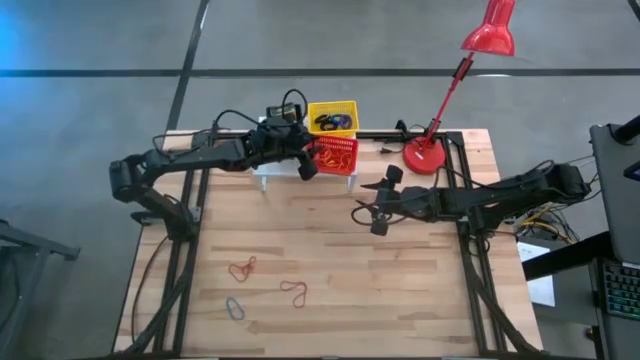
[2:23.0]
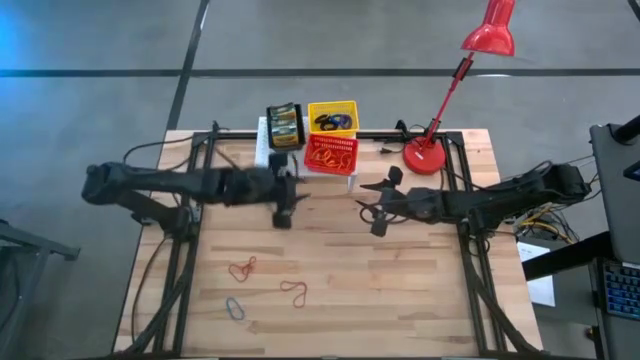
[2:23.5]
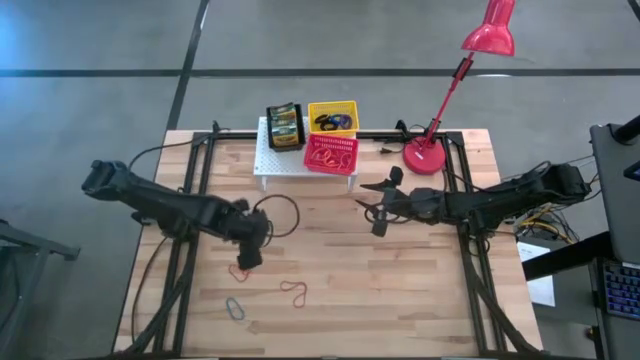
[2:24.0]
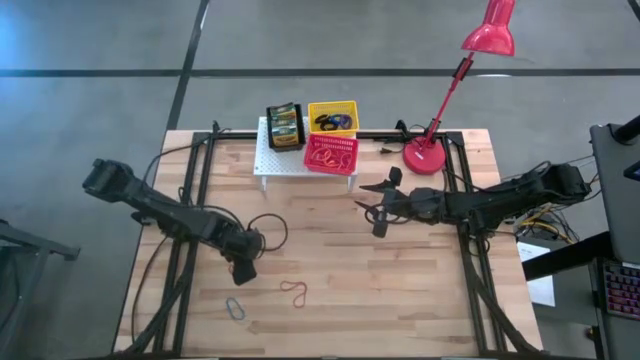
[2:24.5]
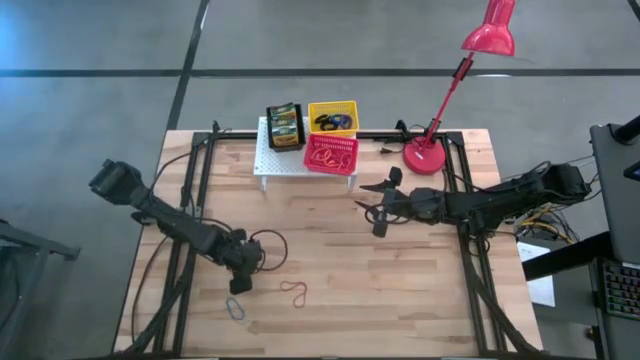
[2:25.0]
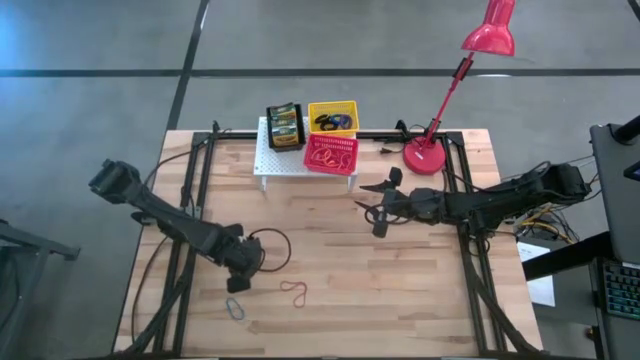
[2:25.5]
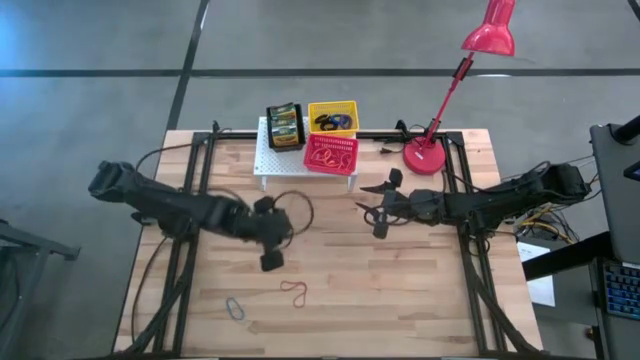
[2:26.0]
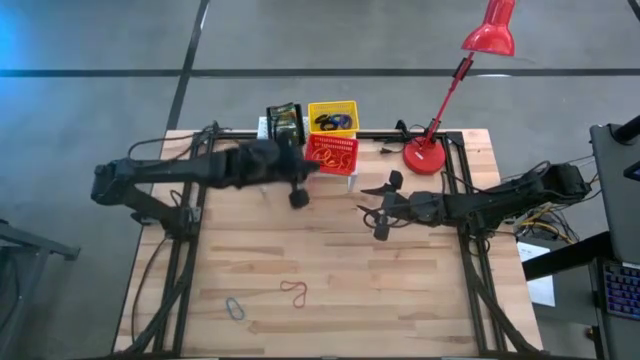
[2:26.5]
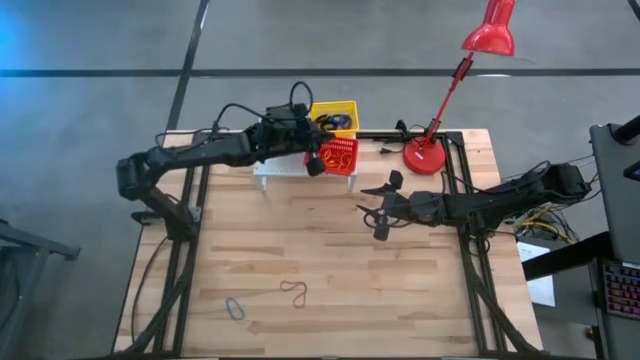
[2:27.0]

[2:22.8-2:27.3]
Task: Pick & Place Office Desk Supplies
Put the red rubber band into the red bin on the shelf

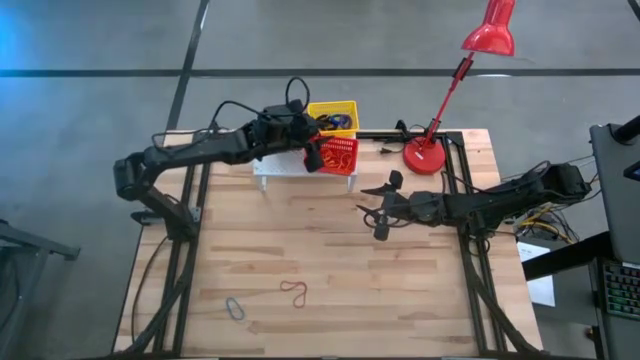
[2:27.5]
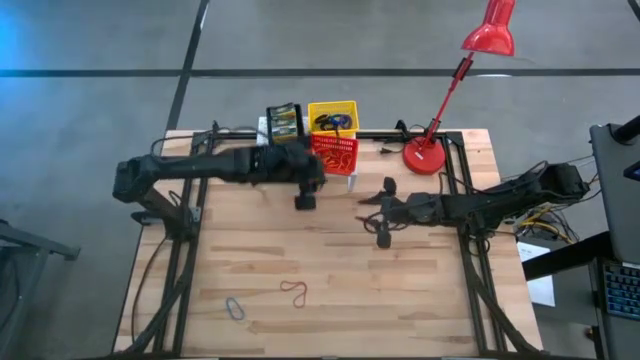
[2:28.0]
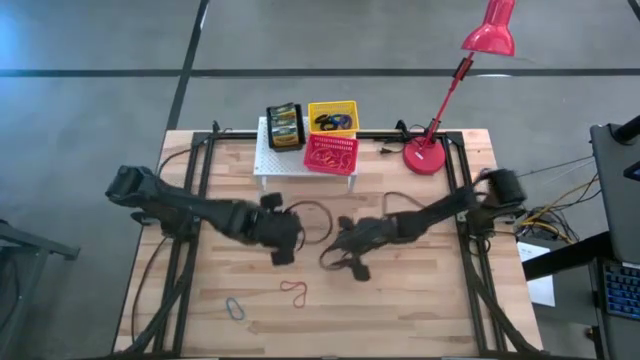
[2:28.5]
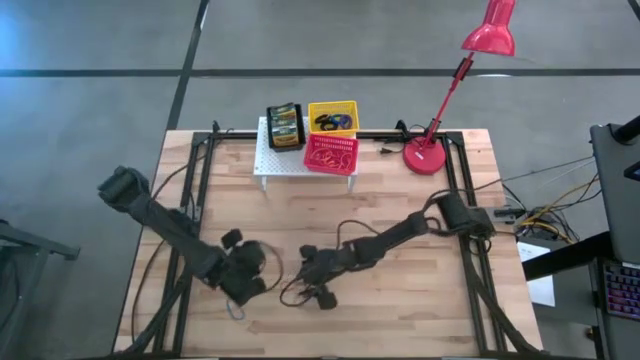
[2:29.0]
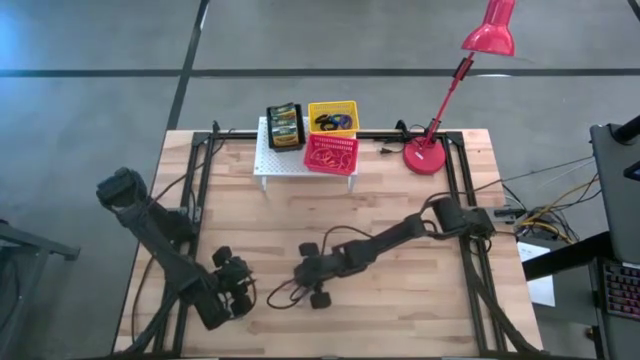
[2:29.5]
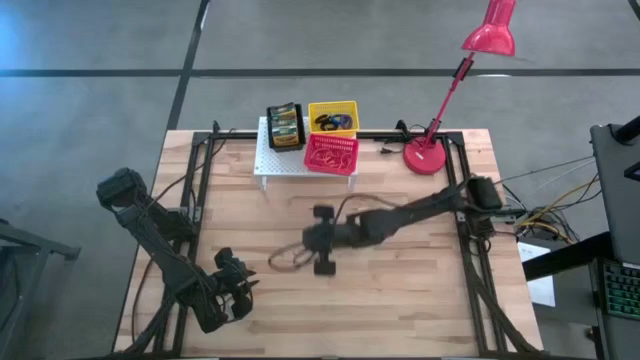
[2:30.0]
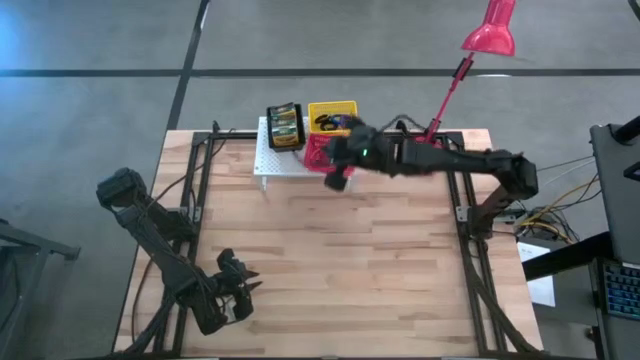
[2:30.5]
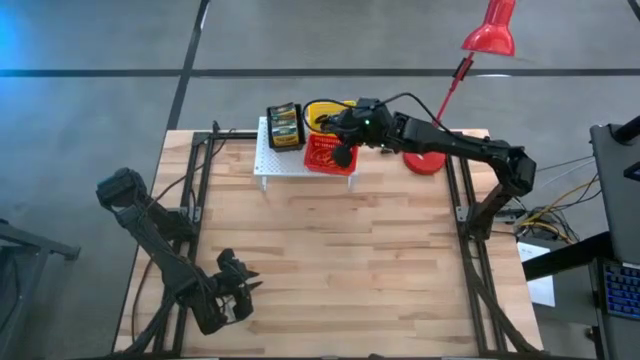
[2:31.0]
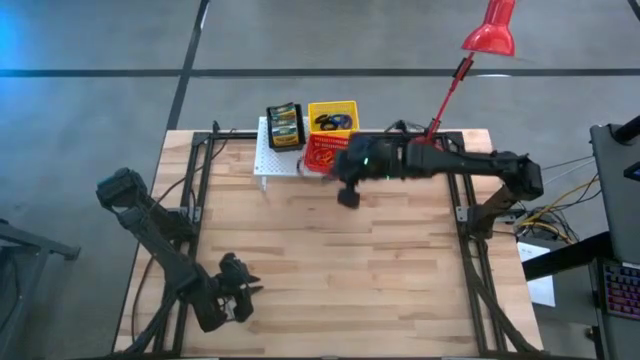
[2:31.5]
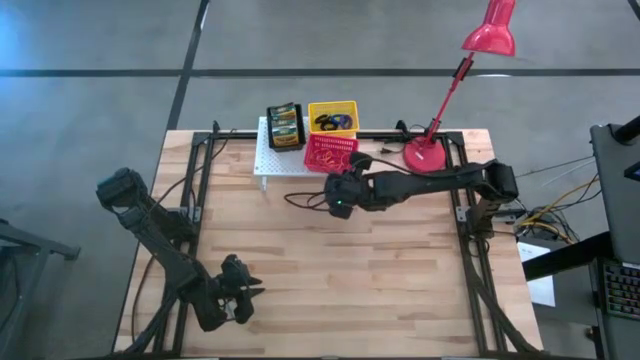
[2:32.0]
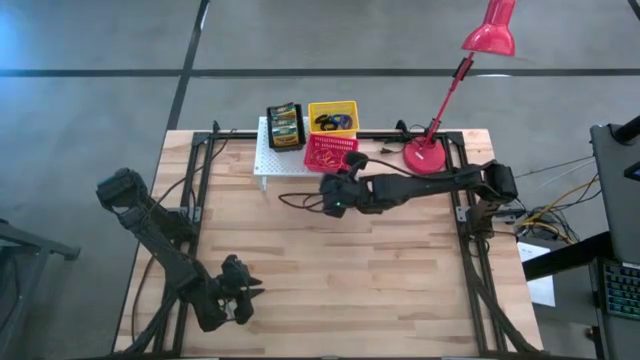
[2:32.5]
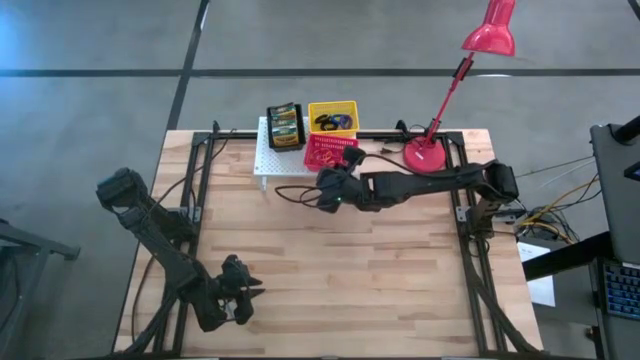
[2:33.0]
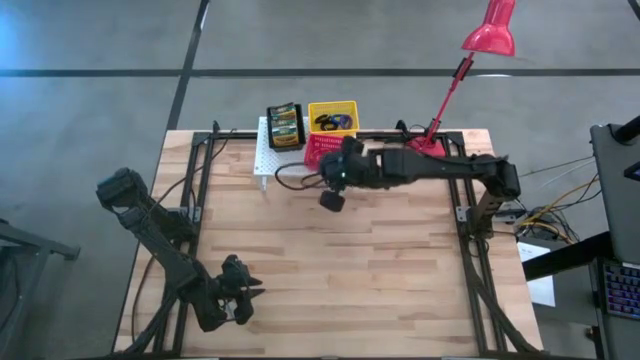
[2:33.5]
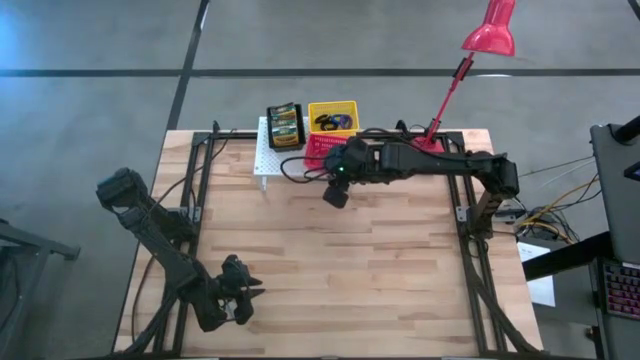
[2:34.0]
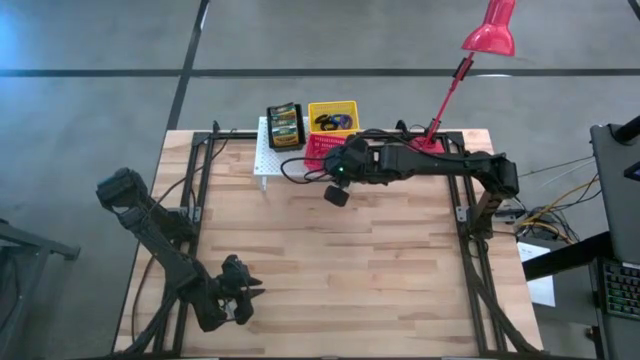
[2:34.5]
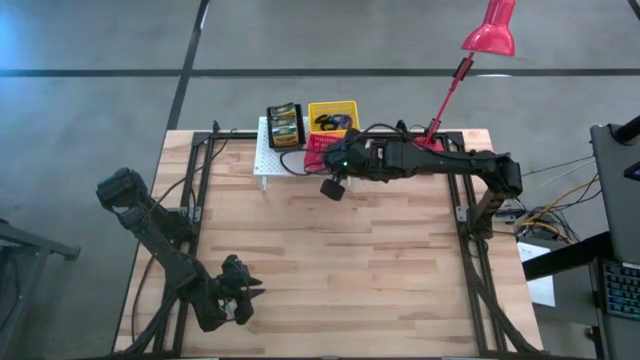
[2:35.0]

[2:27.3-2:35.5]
Put the red rubber band into the red bin on the shelf

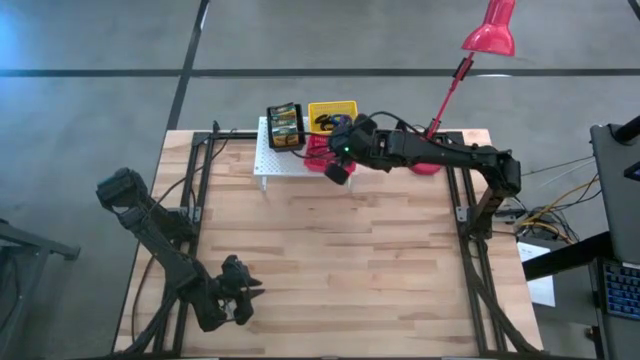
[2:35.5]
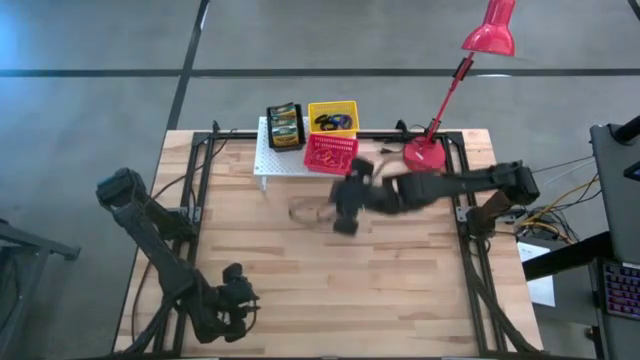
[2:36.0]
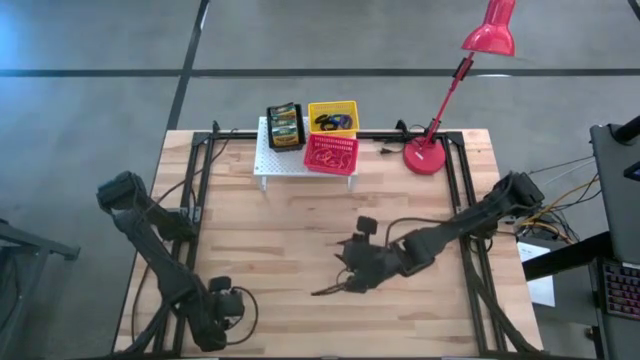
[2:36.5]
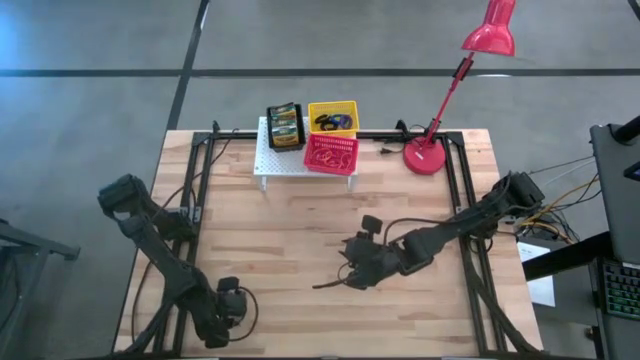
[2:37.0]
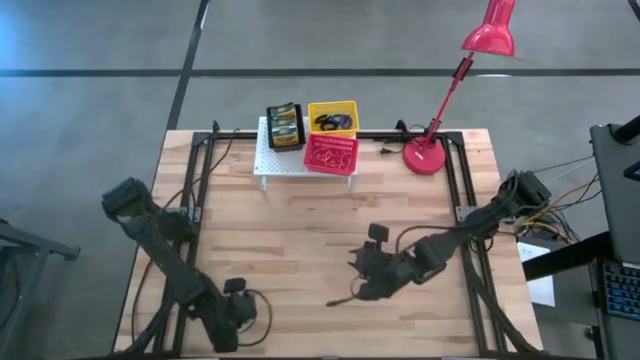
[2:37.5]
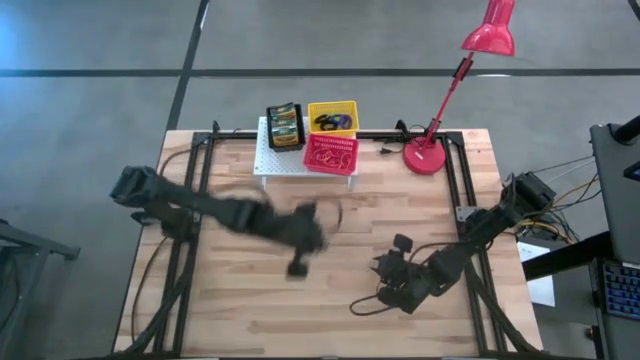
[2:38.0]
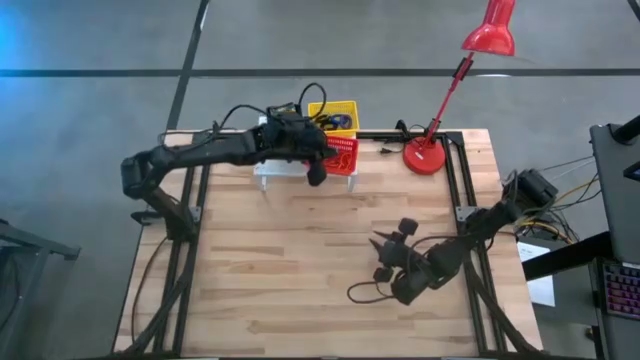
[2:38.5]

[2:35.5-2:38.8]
Put the blue rubber band into the red bin on the shelf

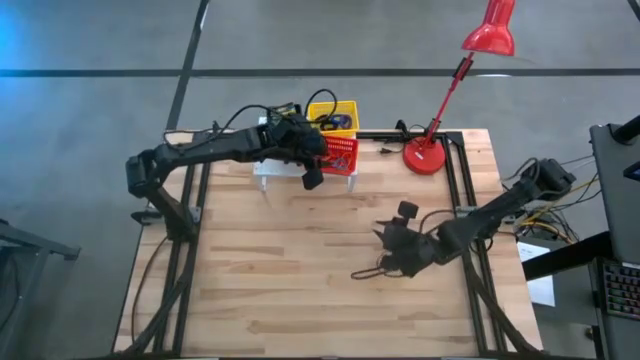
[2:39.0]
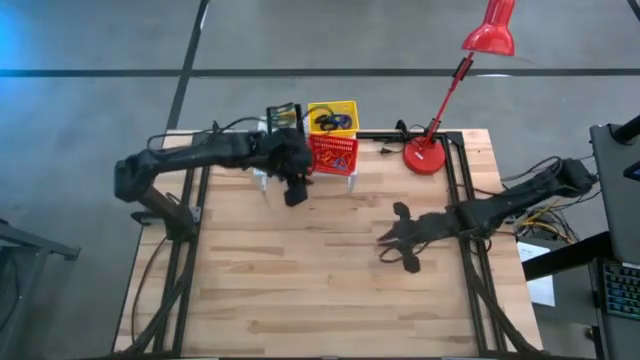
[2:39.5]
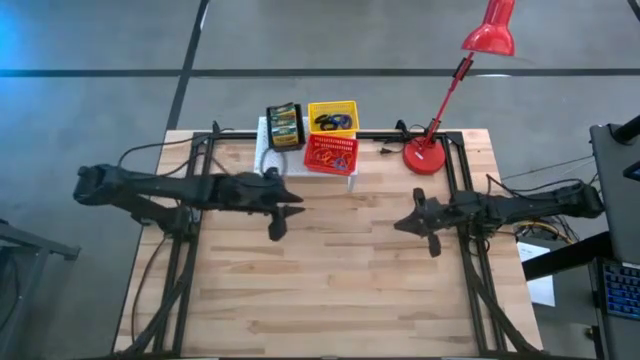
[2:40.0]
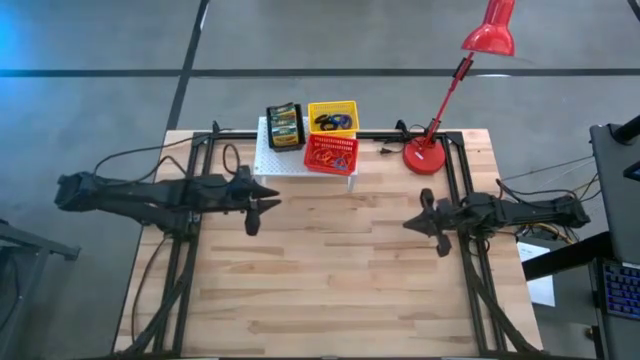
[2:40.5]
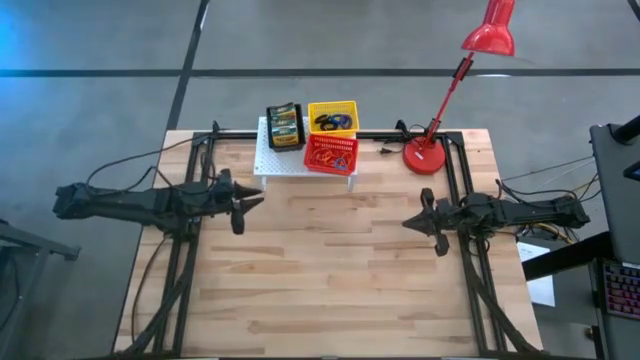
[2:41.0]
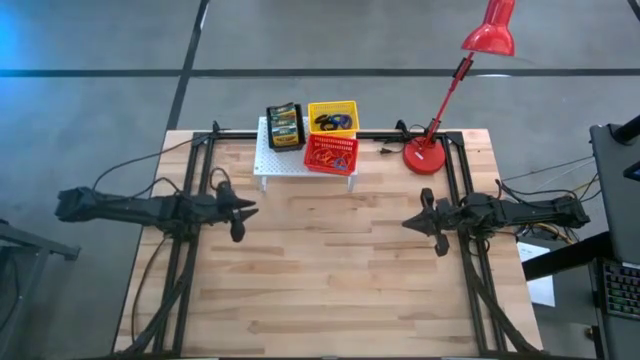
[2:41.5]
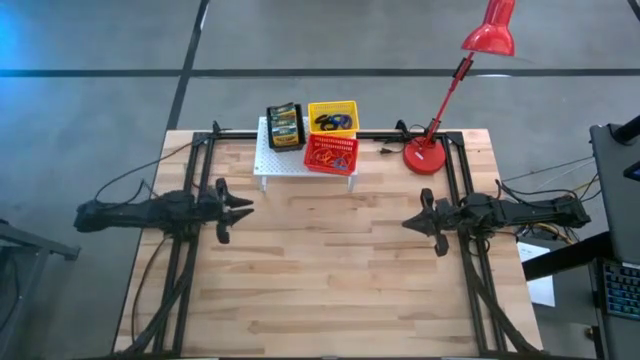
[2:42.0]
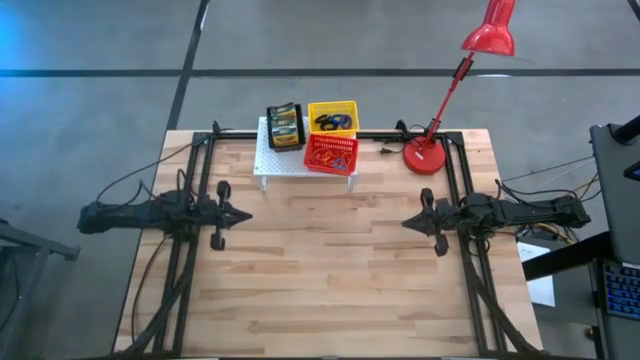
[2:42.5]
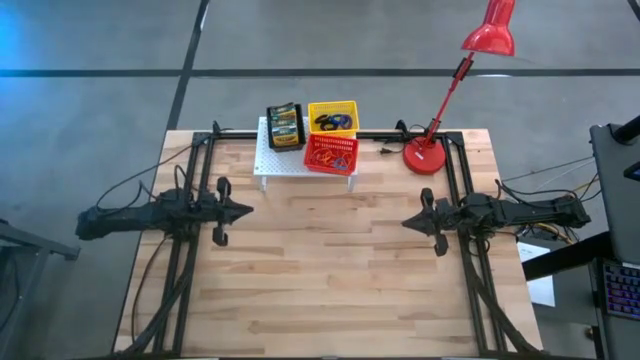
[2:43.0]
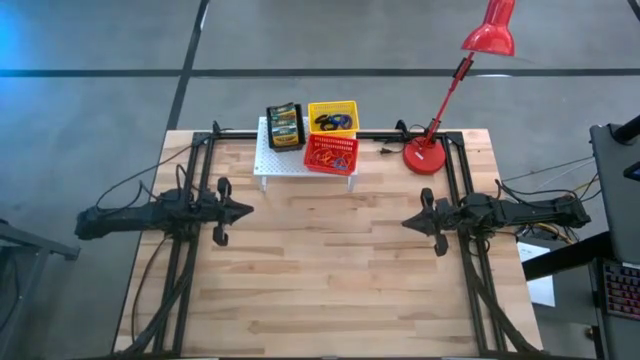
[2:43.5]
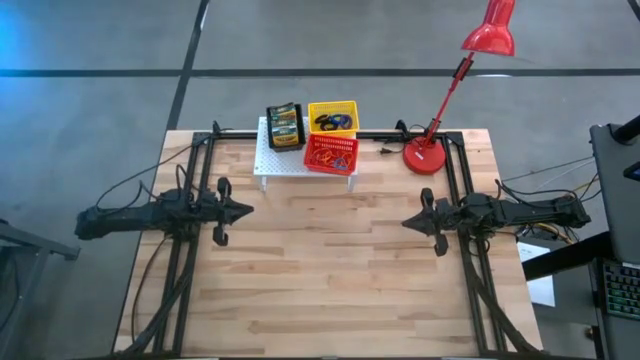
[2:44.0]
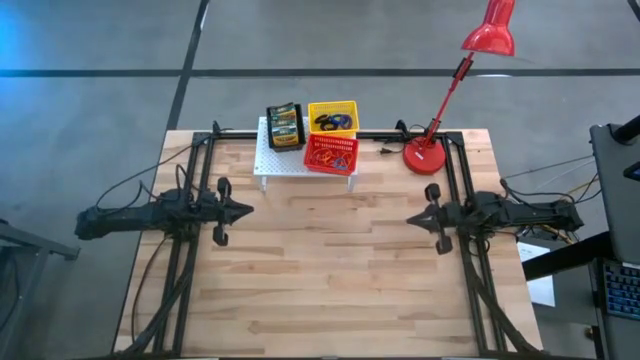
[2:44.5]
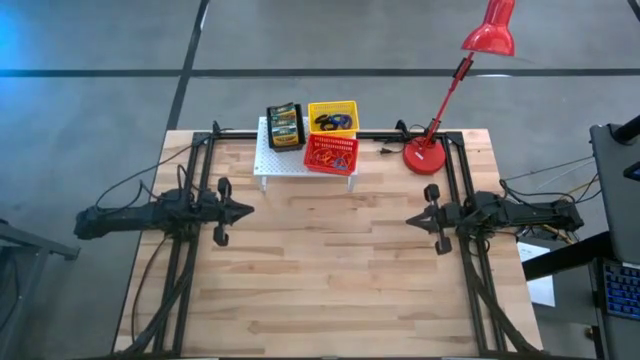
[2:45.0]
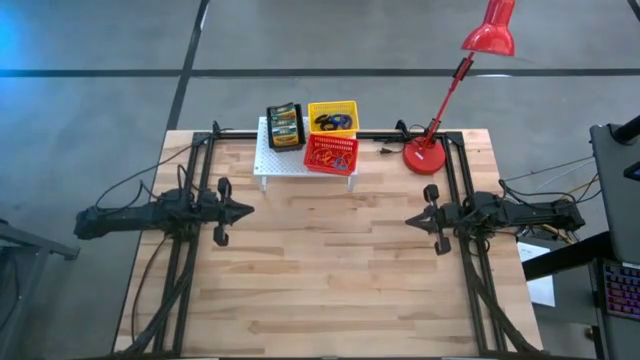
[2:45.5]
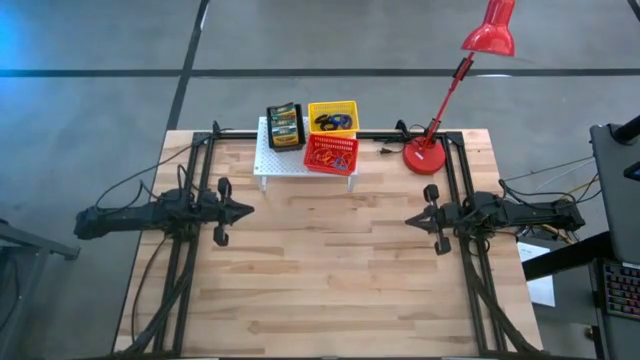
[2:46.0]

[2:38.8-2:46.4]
Return to Home Position
